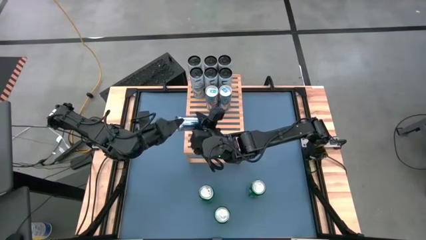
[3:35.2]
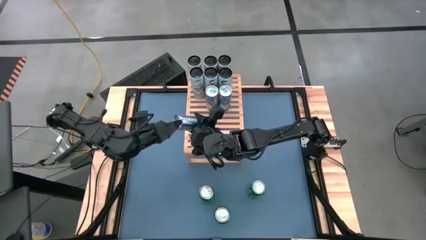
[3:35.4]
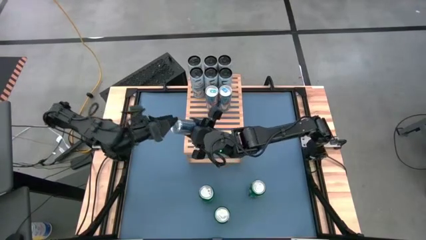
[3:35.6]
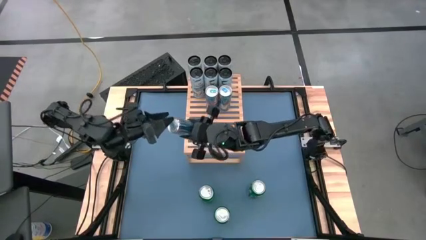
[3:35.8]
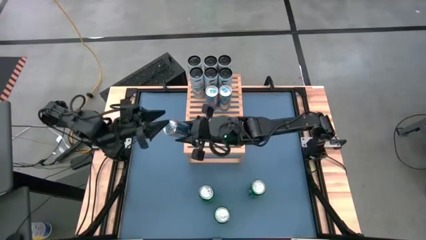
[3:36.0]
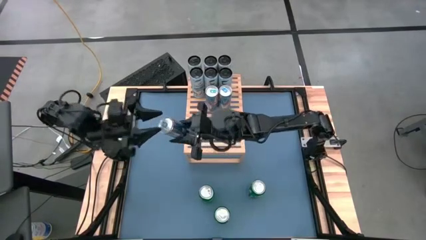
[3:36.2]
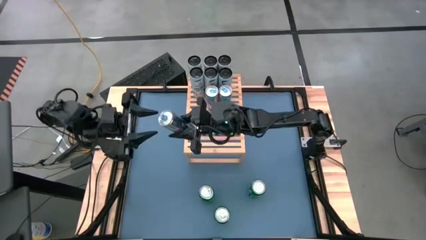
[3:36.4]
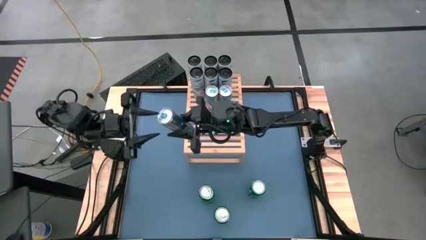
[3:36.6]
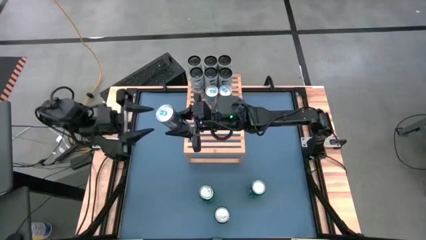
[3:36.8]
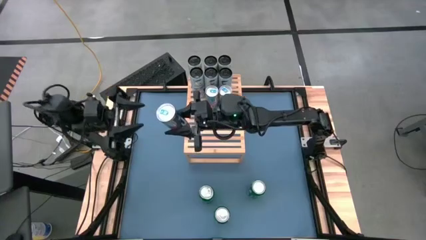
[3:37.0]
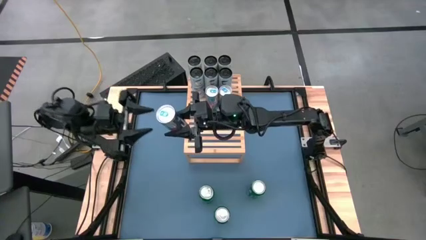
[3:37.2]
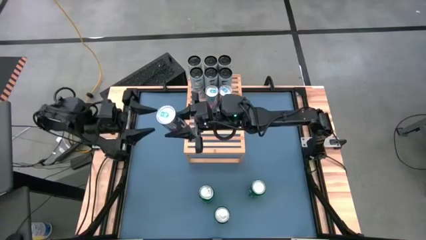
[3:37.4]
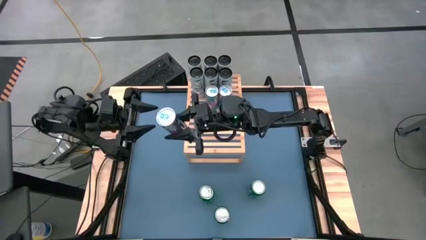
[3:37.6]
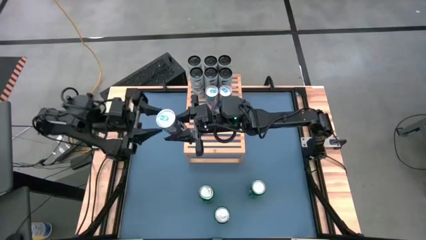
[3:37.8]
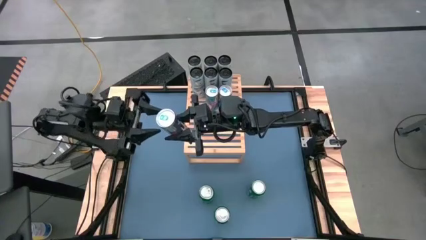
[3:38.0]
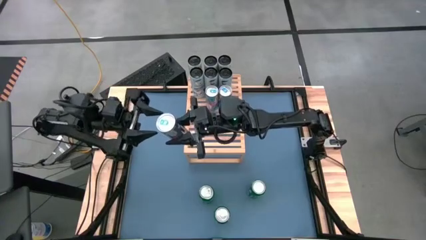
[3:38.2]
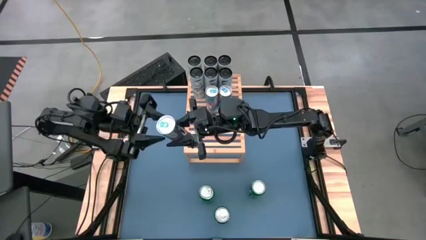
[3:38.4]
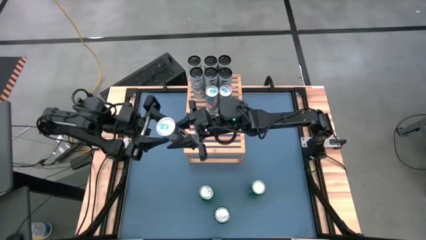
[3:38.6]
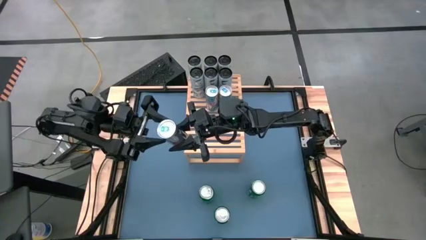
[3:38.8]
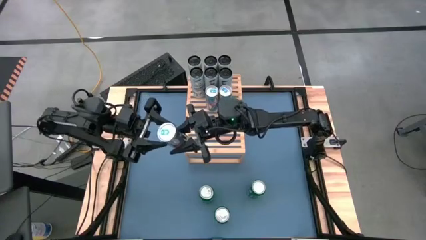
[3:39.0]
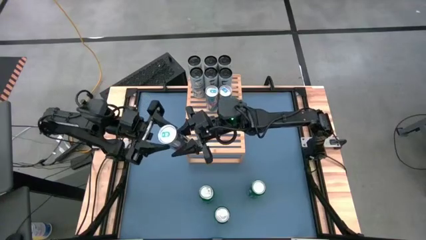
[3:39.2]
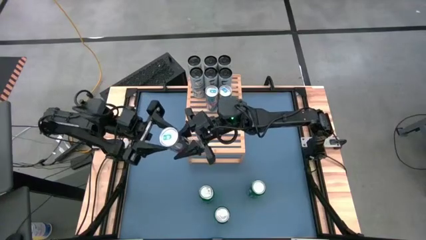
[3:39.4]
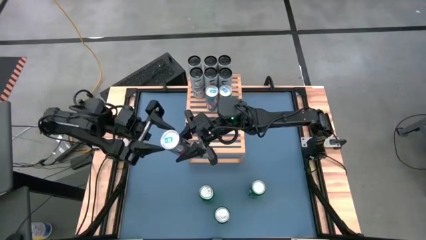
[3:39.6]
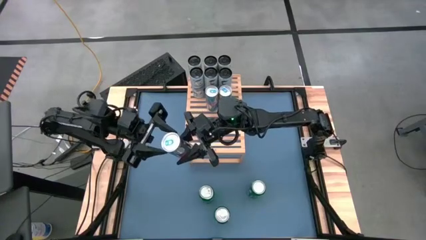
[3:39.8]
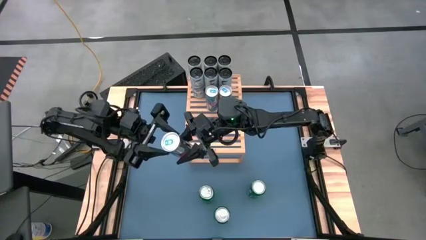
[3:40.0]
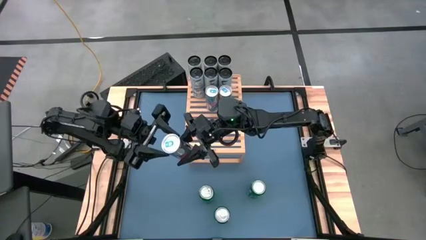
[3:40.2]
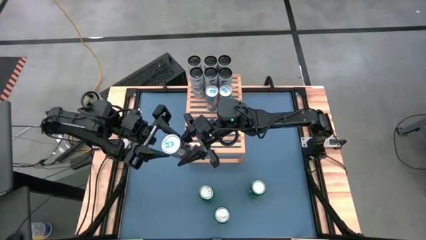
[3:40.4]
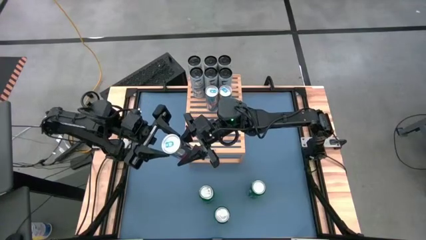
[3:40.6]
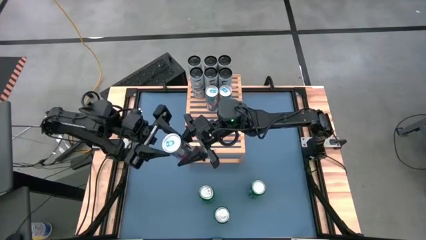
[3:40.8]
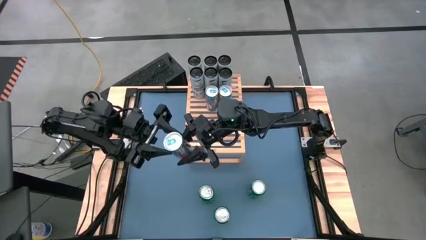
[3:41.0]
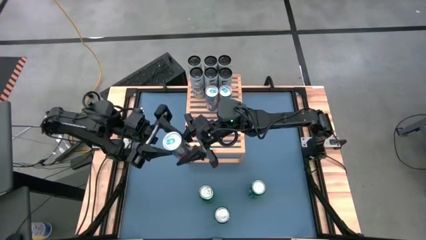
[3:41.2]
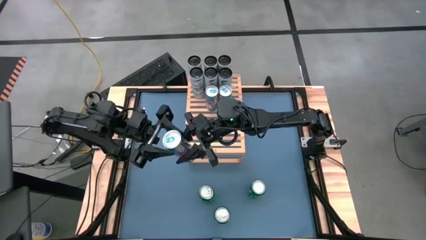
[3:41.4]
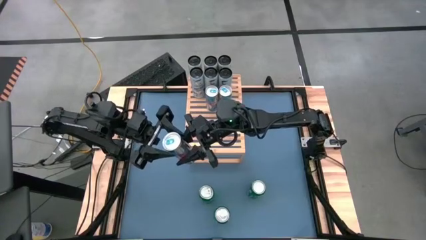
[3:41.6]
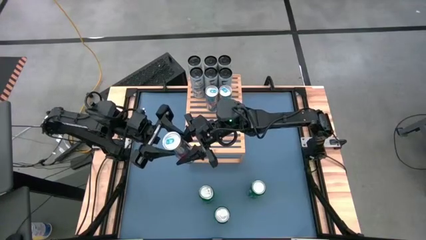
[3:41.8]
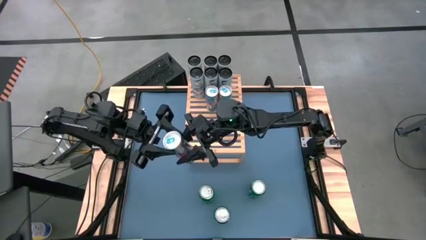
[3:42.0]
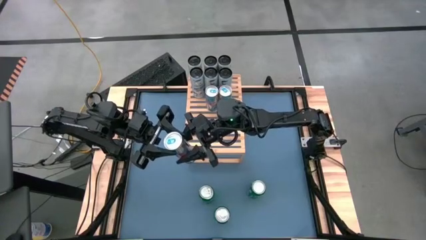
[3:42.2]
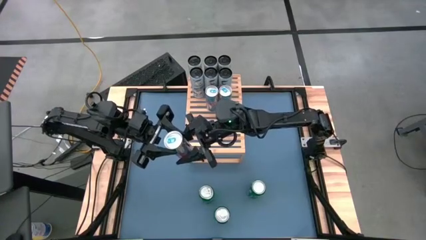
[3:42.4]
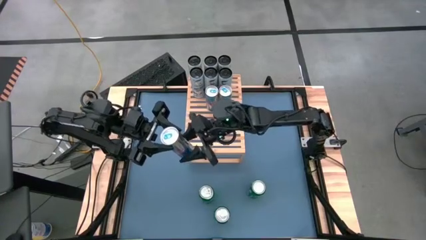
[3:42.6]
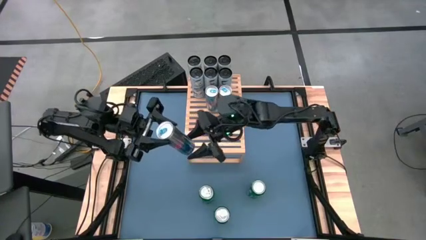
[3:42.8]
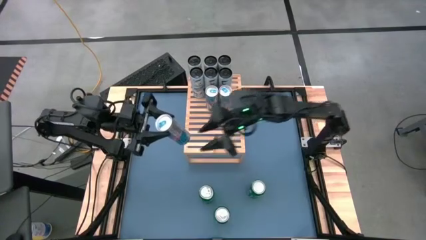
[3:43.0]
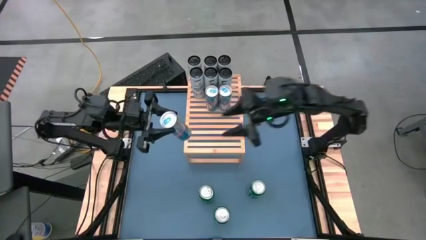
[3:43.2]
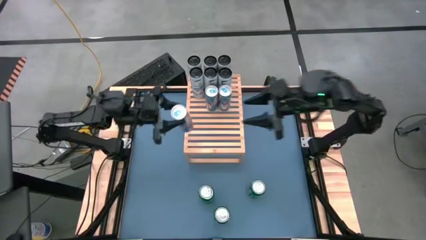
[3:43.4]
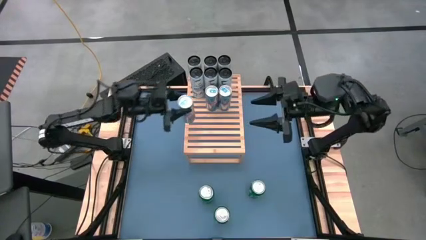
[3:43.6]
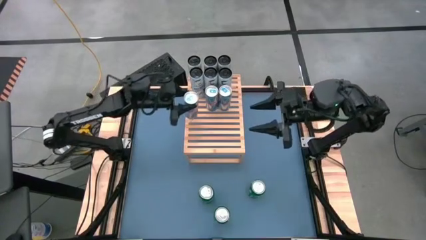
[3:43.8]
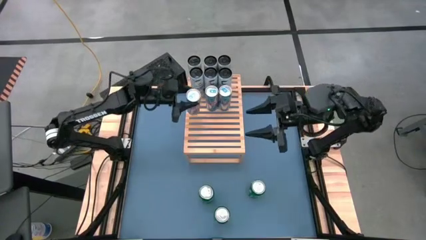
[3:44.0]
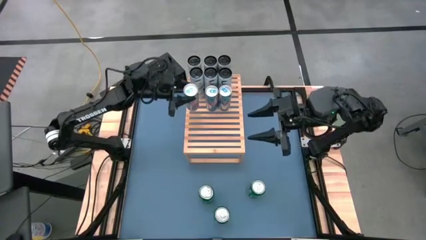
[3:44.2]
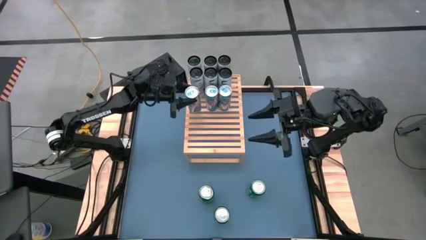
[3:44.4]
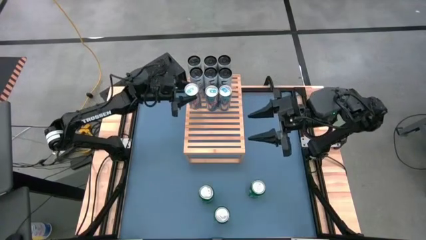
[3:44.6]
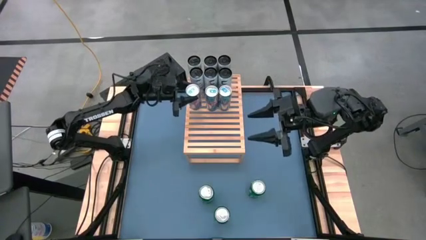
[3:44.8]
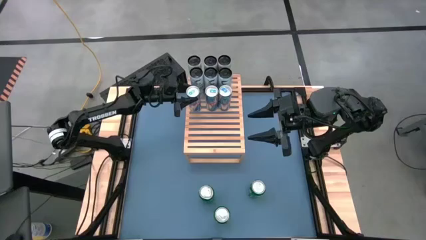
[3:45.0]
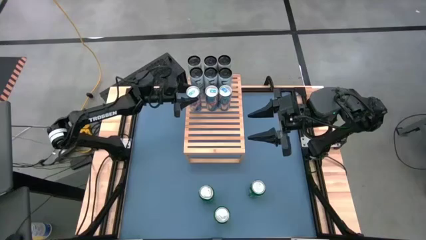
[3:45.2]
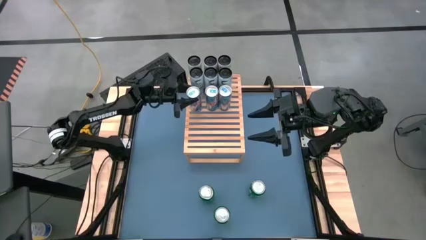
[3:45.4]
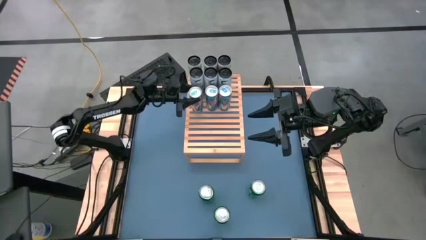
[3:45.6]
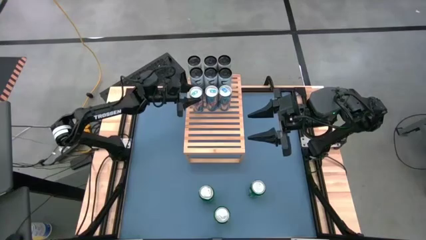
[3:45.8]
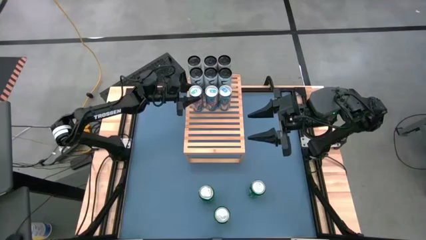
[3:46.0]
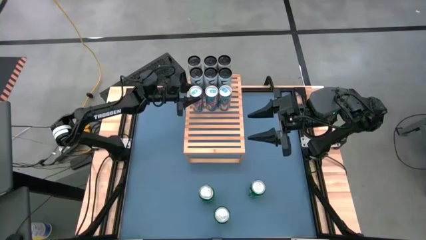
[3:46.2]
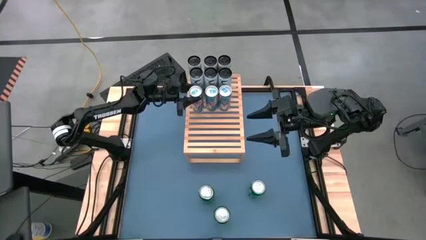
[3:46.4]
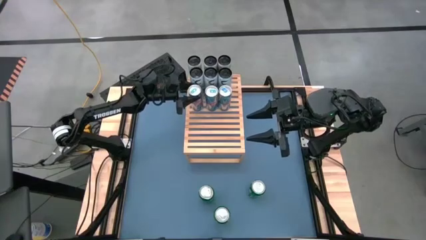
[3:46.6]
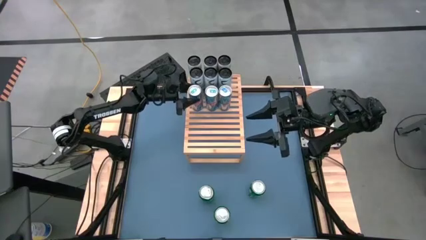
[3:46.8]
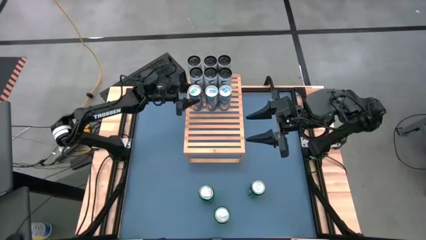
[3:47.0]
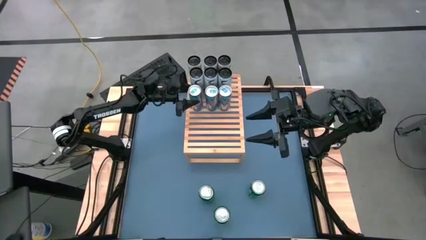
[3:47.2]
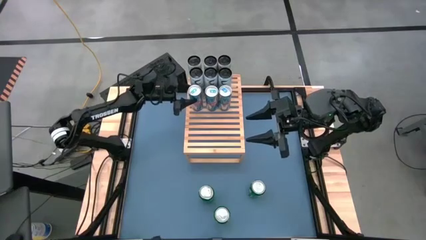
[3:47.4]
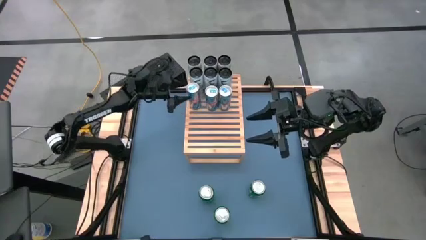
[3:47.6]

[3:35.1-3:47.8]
Task: Place canned beverage on shelf
Put the blue soda can on the shelf aligned to the other blue soda can
